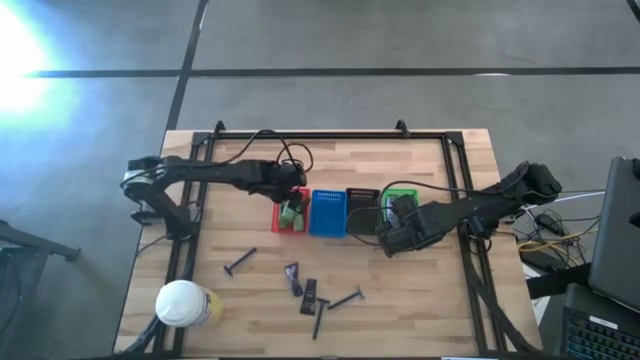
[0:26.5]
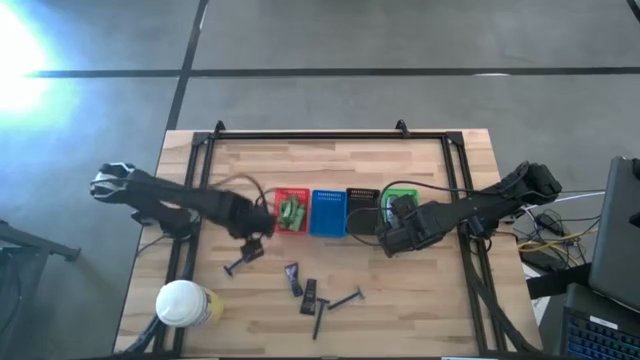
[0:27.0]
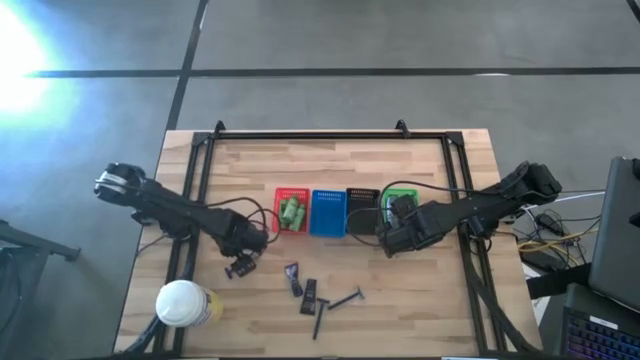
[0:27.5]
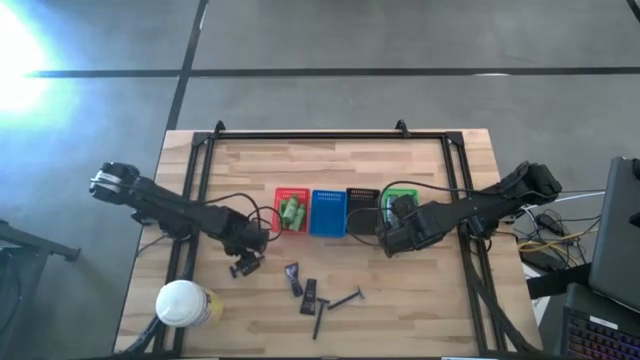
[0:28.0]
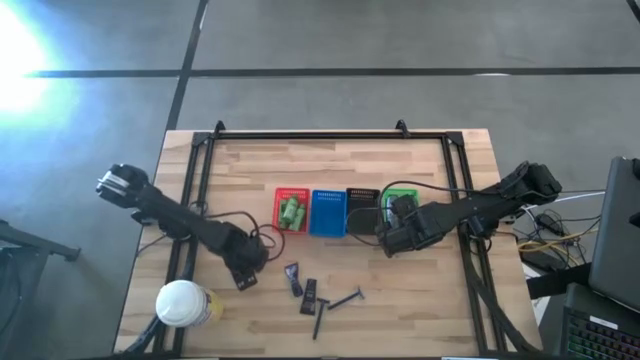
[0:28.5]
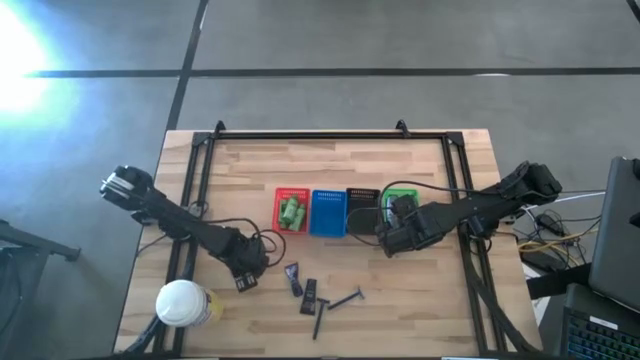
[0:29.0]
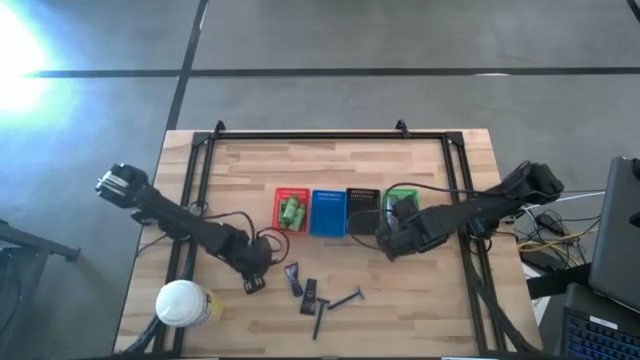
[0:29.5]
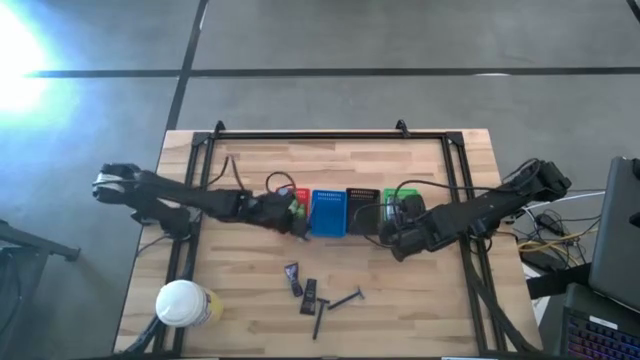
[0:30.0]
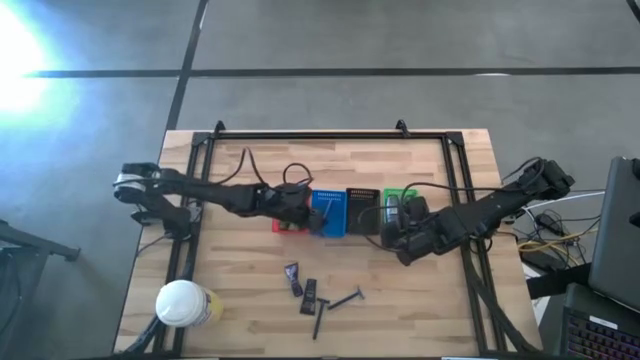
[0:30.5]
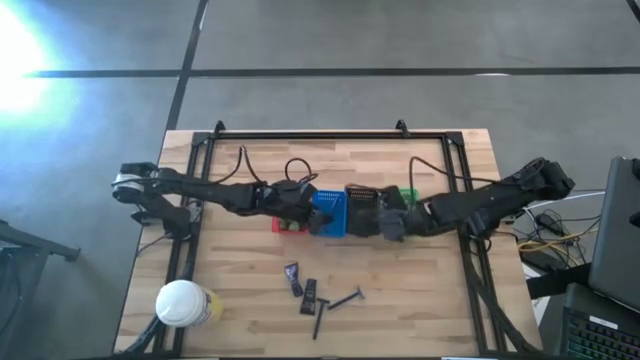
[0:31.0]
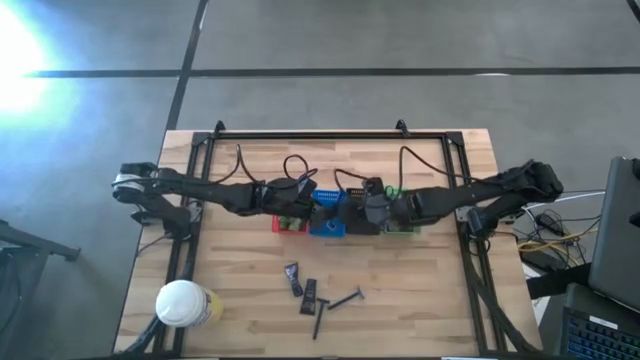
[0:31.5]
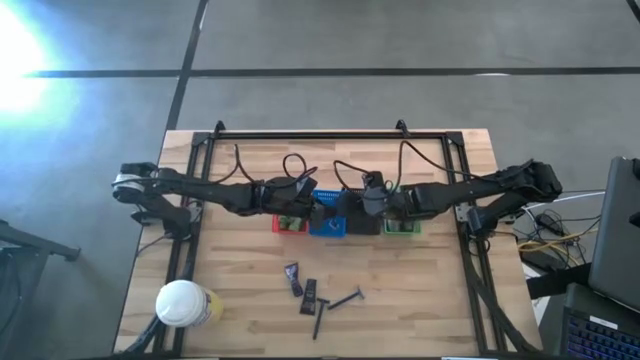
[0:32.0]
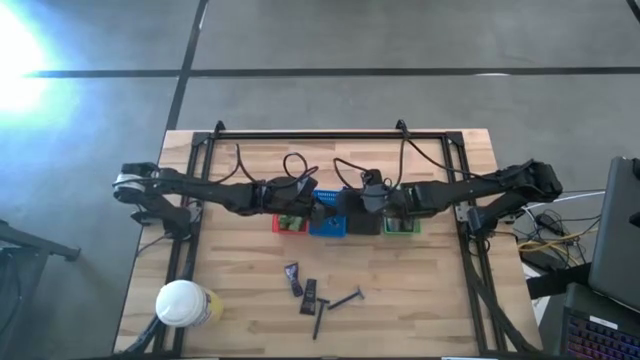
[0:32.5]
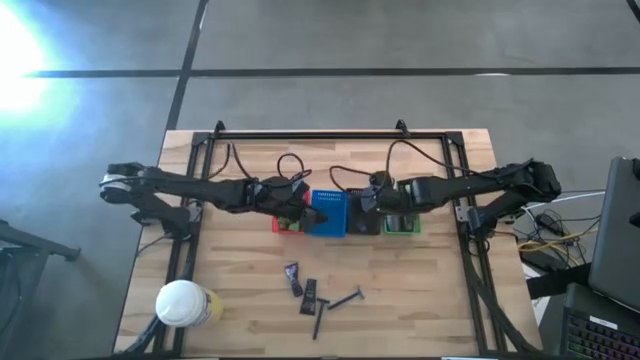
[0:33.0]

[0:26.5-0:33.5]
Task: Pick & Place Travel size toiletries
Put the blue razor into the black bin

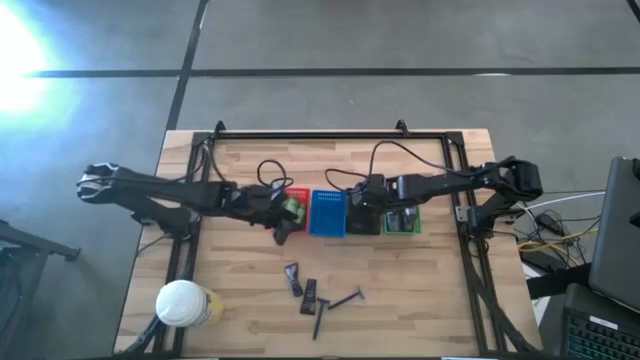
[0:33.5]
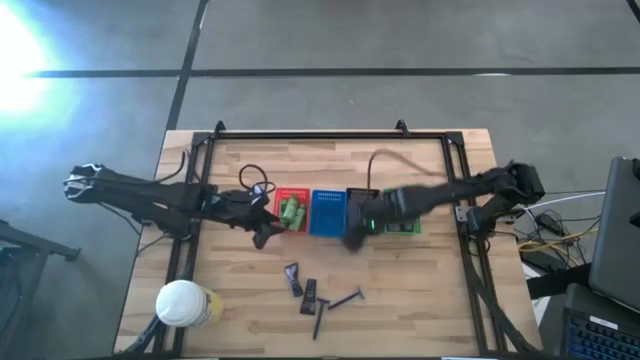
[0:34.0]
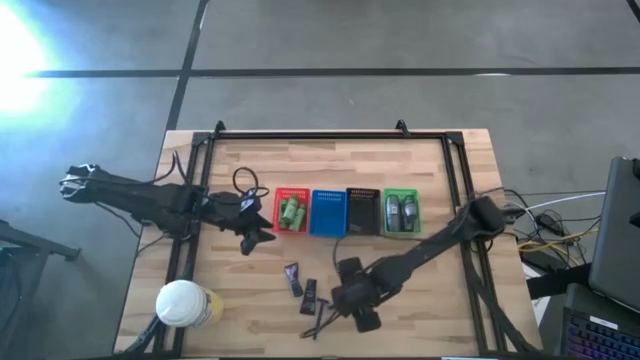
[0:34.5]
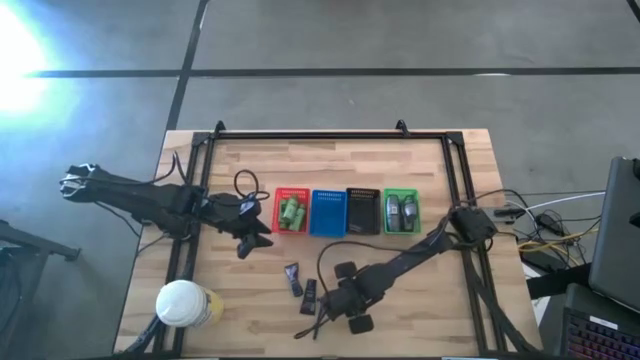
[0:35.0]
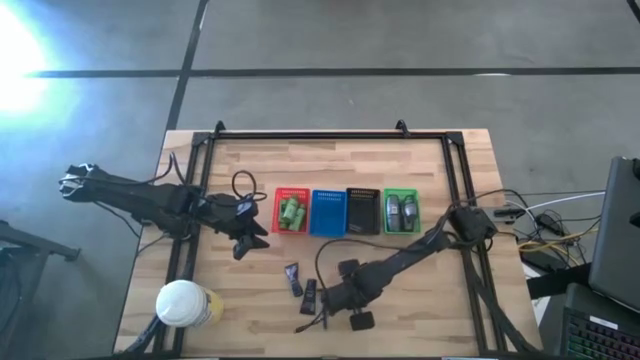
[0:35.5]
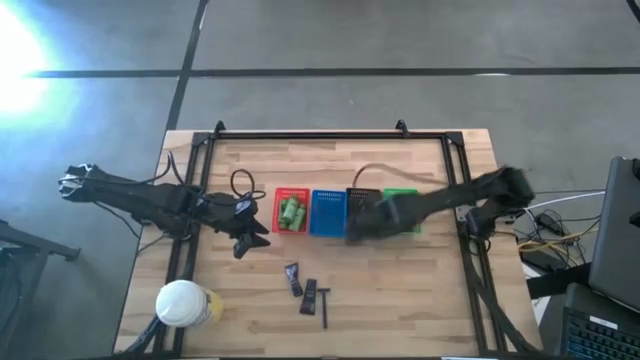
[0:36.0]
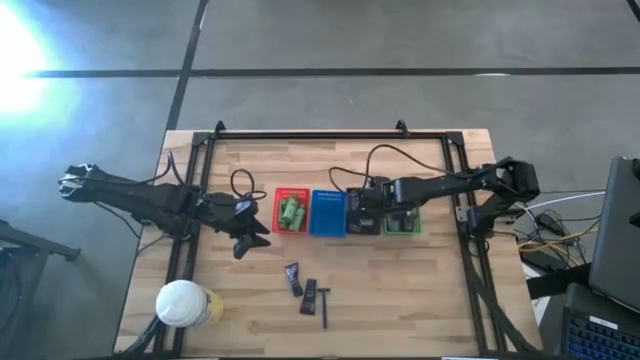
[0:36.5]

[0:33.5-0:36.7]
Put the blue razor into the black bin

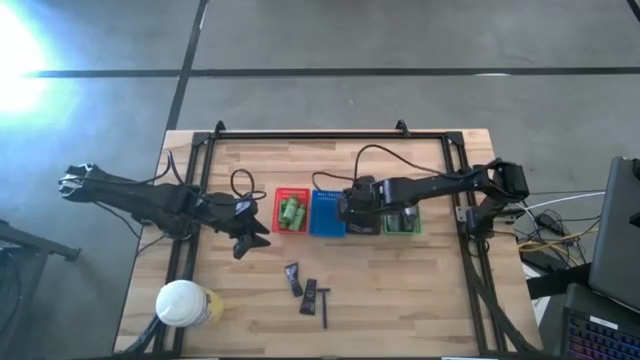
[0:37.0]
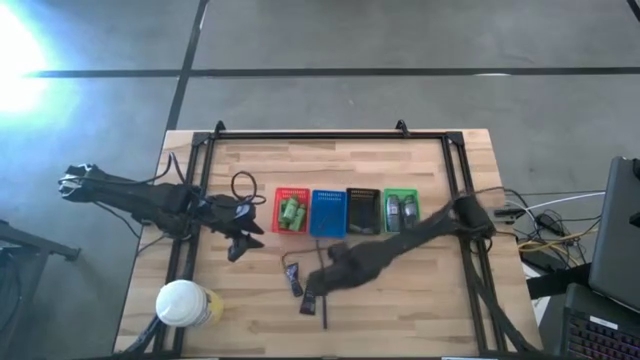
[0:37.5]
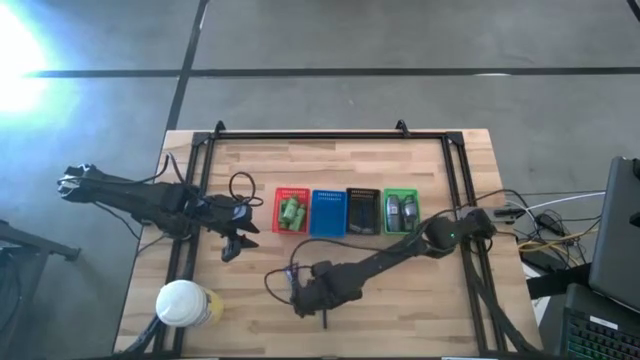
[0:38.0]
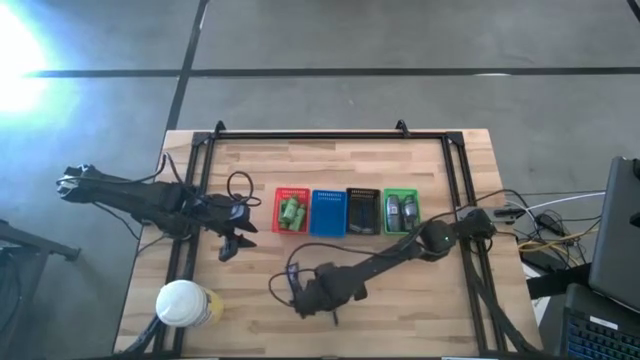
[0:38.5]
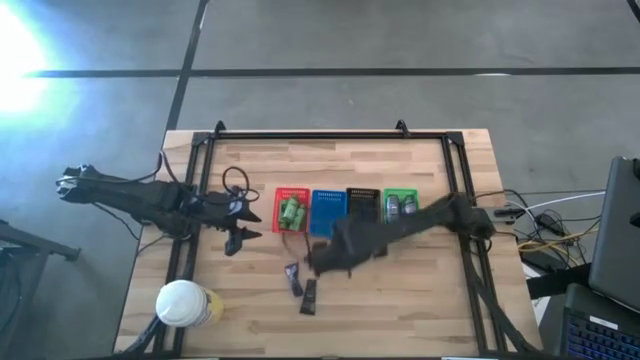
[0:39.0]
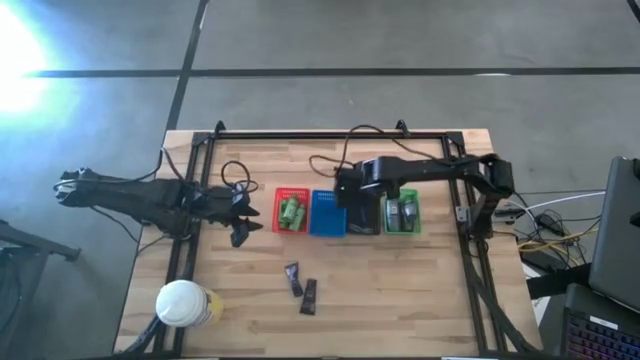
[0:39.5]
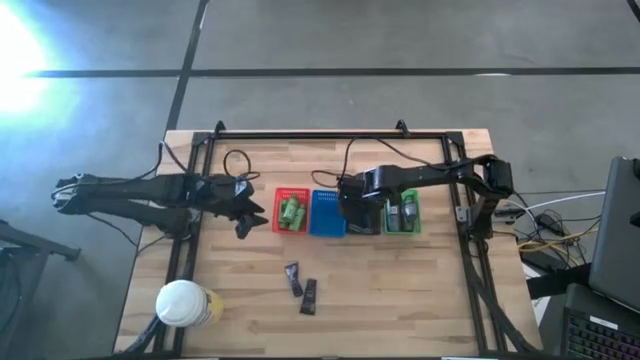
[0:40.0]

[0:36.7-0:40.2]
Put the blue razor into the black bin

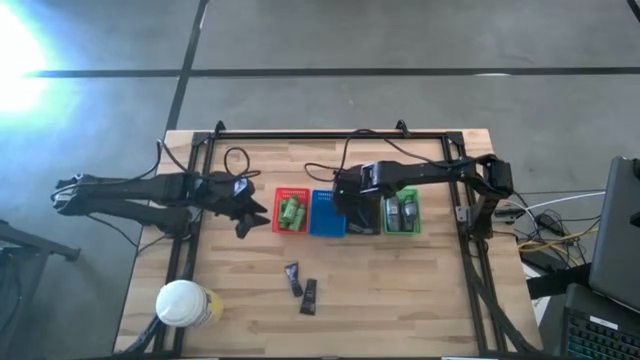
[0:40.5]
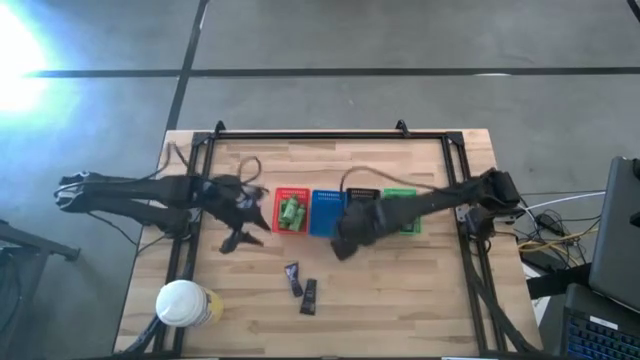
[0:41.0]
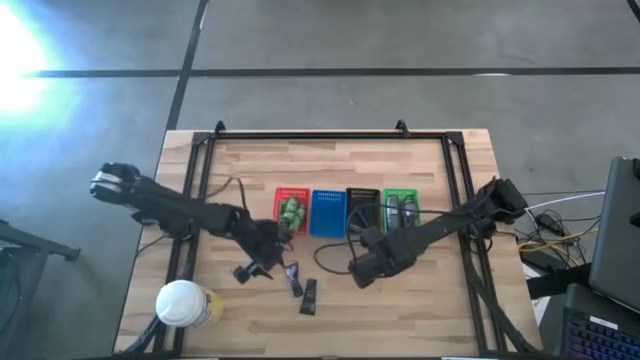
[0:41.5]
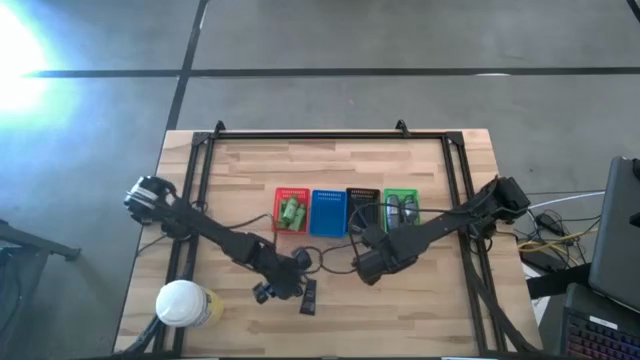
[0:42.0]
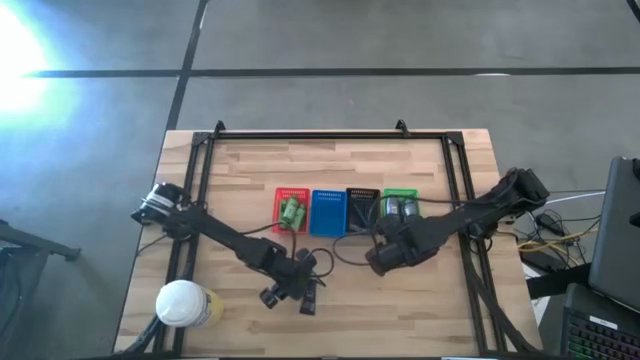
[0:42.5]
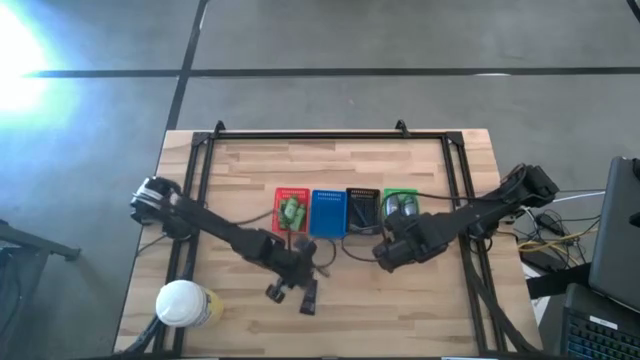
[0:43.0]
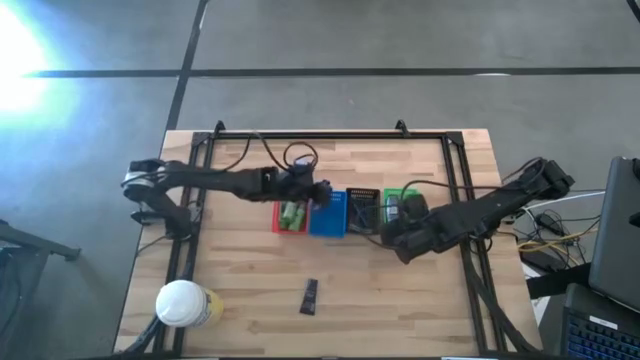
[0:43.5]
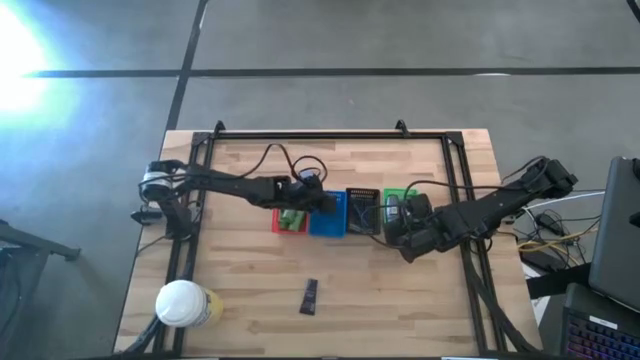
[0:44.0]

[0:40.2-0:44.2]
Put the blue shaving cream into the blue bin

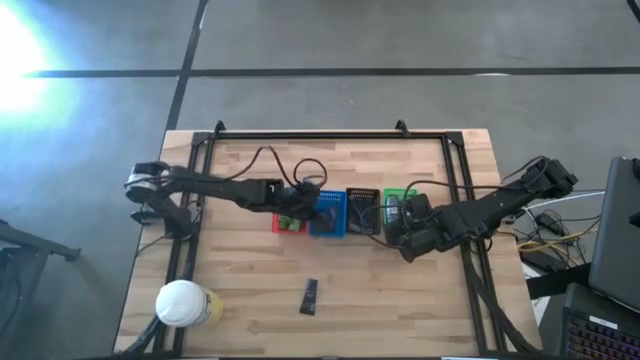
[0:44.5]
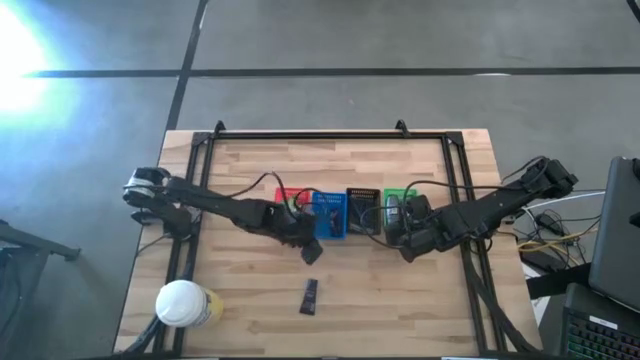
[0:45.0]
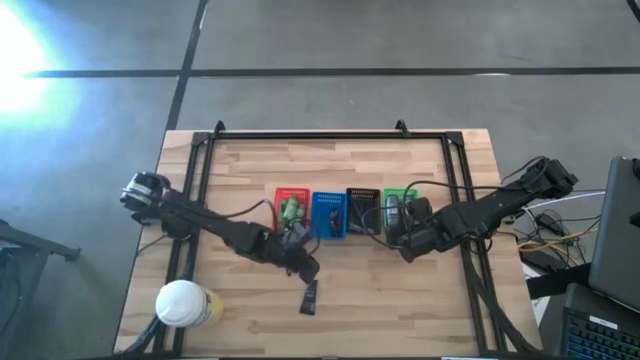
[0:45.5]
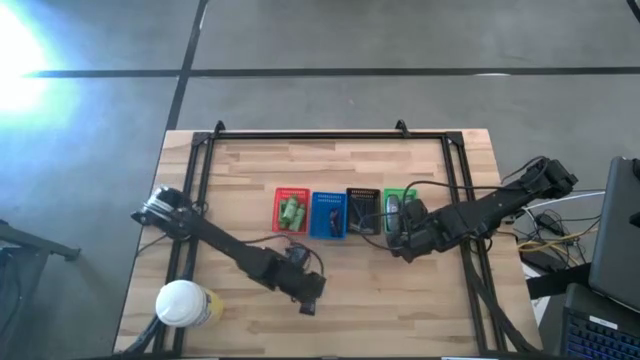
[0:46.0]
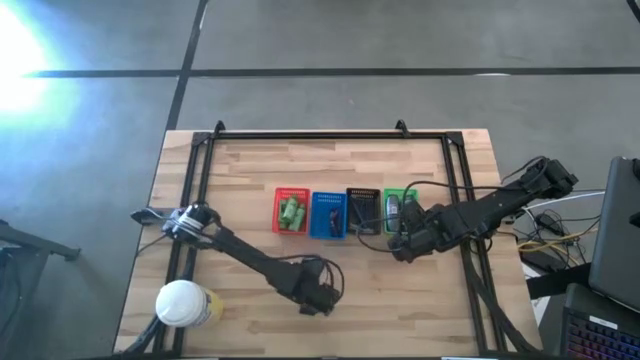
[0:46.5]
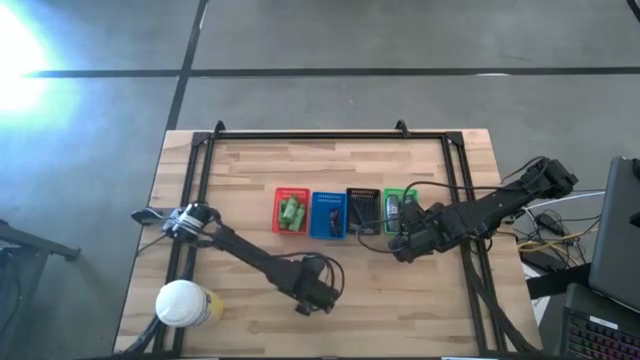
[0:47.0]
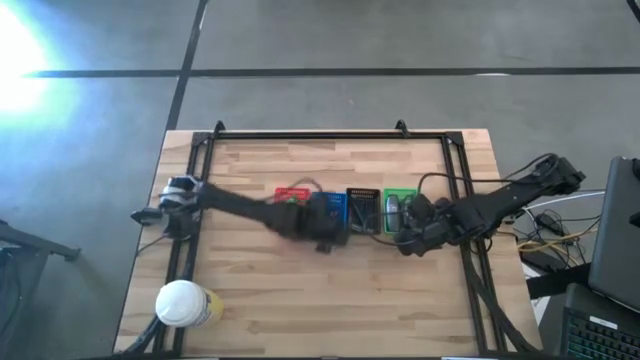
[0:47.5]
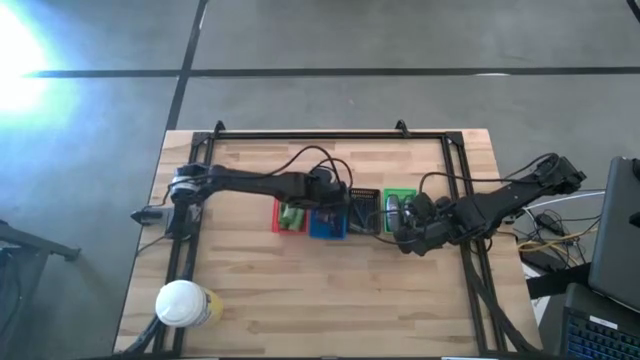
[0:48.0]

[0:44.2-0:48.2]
Put the blue shaving cream into the blue bin
